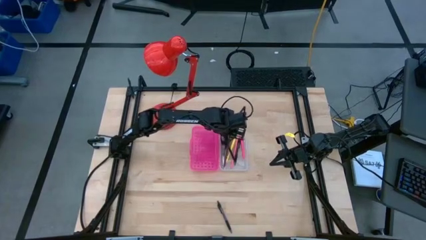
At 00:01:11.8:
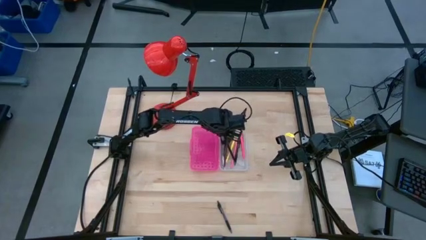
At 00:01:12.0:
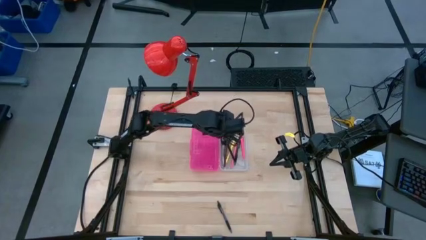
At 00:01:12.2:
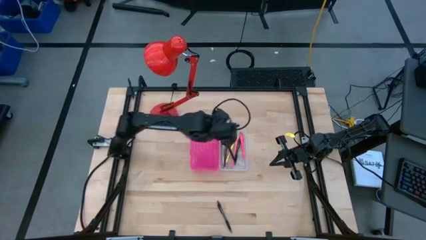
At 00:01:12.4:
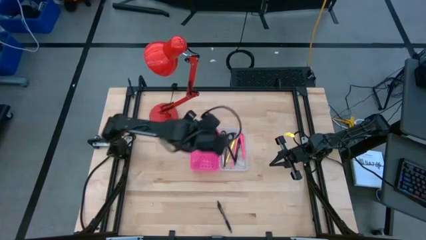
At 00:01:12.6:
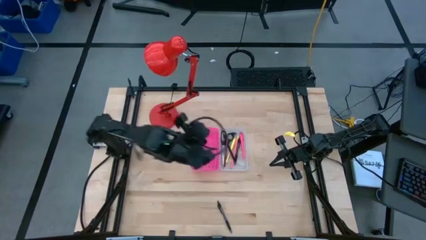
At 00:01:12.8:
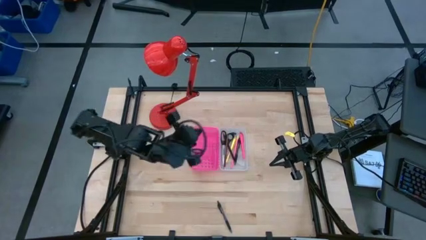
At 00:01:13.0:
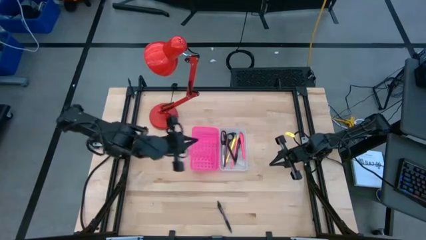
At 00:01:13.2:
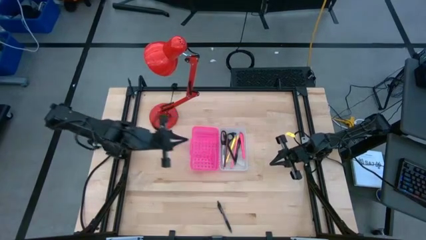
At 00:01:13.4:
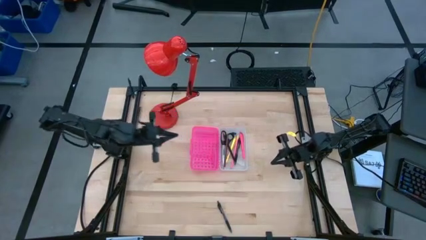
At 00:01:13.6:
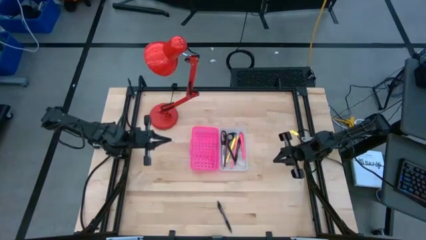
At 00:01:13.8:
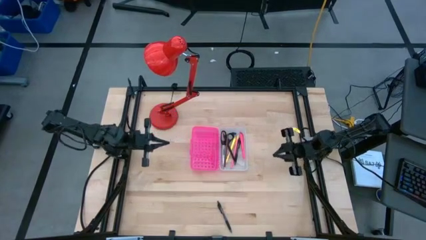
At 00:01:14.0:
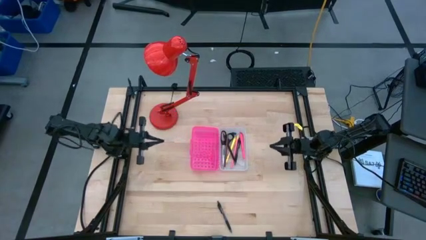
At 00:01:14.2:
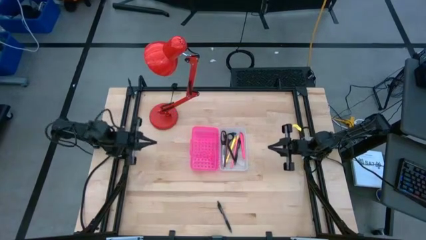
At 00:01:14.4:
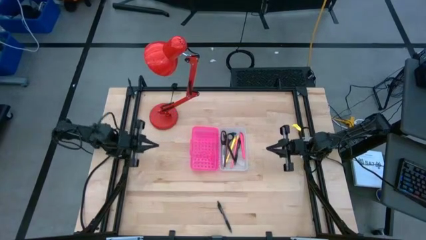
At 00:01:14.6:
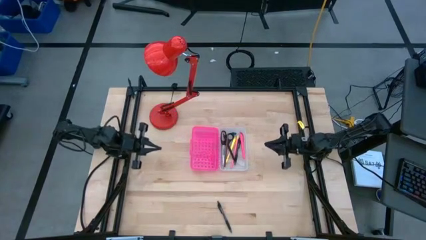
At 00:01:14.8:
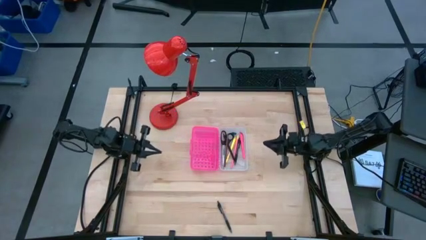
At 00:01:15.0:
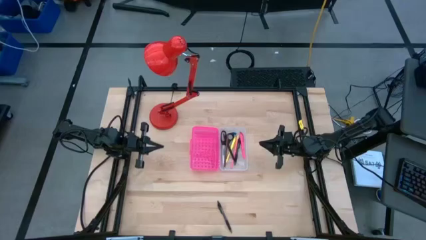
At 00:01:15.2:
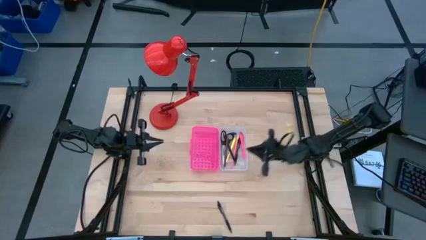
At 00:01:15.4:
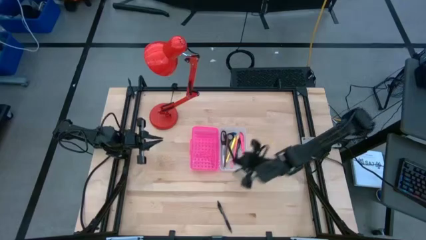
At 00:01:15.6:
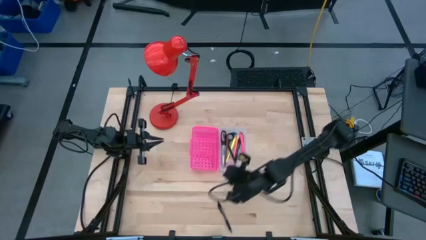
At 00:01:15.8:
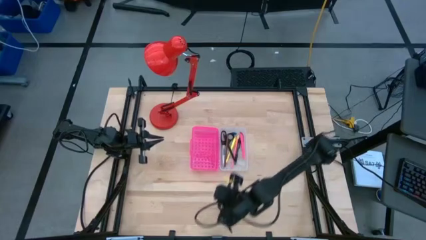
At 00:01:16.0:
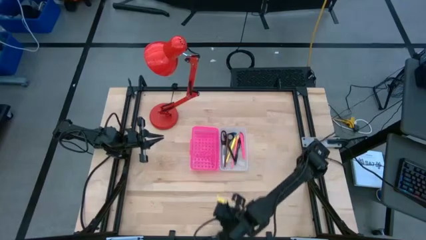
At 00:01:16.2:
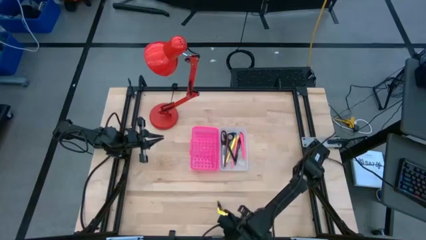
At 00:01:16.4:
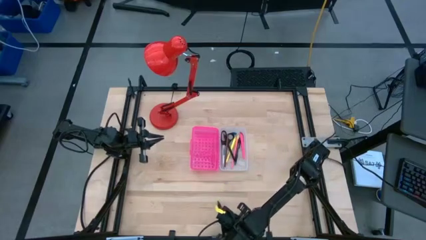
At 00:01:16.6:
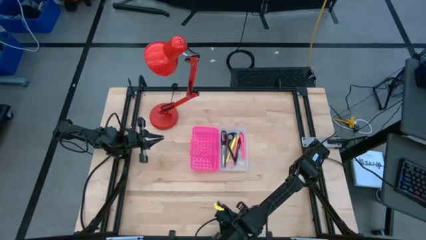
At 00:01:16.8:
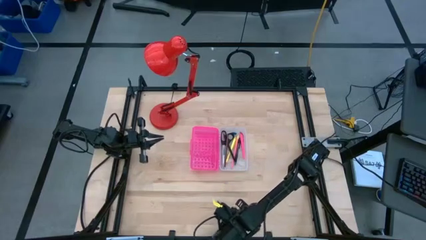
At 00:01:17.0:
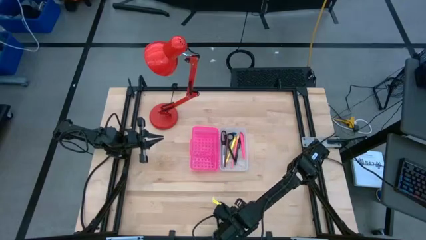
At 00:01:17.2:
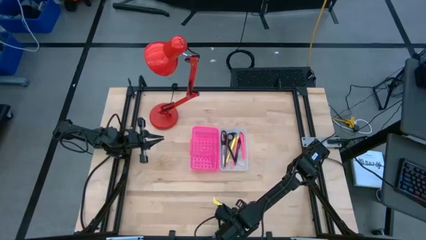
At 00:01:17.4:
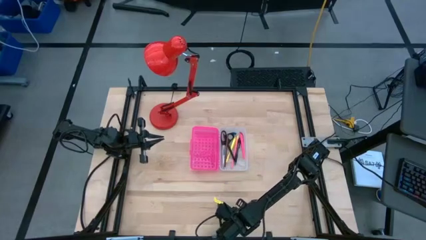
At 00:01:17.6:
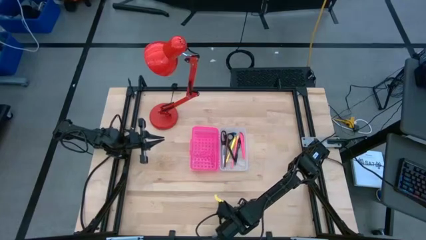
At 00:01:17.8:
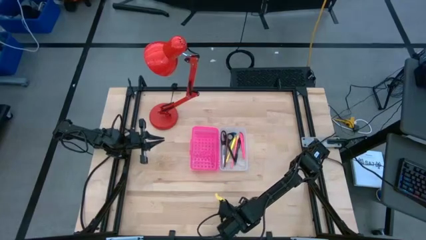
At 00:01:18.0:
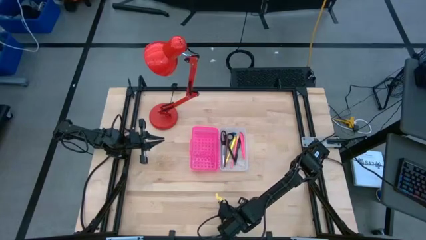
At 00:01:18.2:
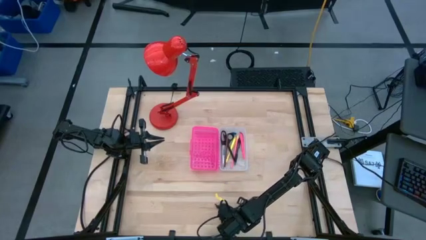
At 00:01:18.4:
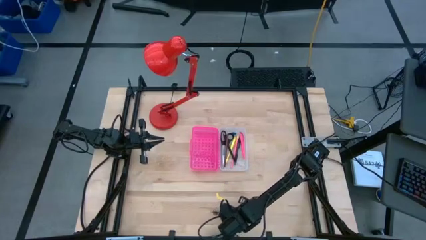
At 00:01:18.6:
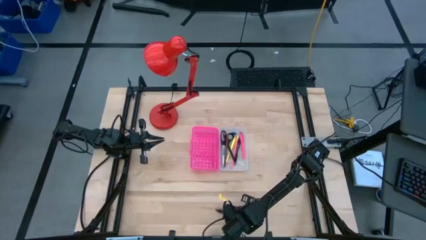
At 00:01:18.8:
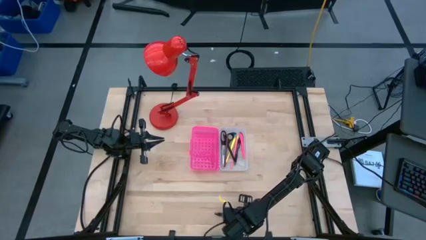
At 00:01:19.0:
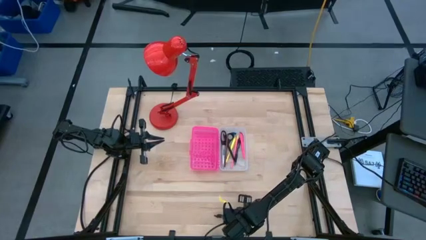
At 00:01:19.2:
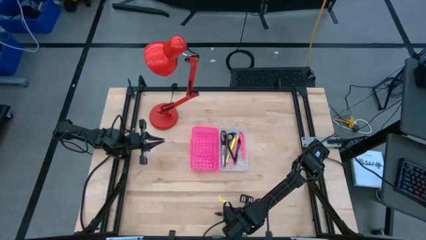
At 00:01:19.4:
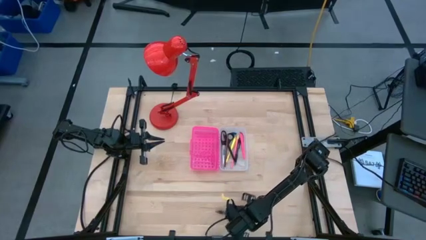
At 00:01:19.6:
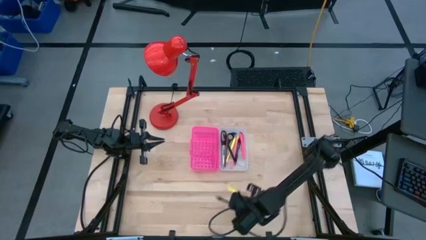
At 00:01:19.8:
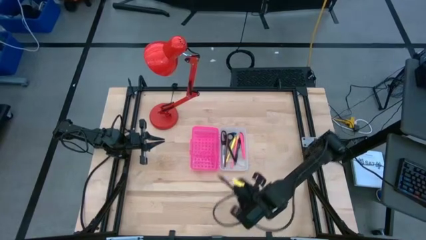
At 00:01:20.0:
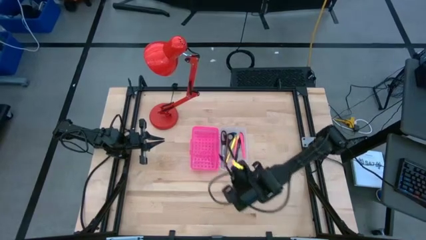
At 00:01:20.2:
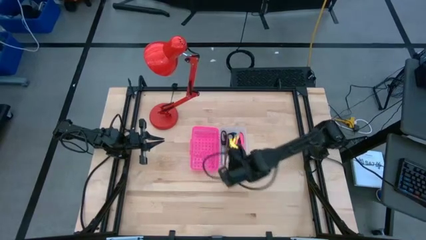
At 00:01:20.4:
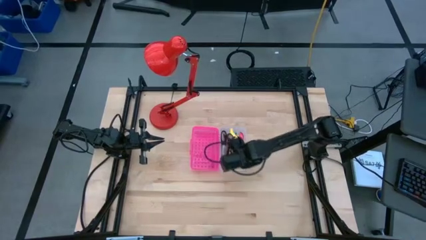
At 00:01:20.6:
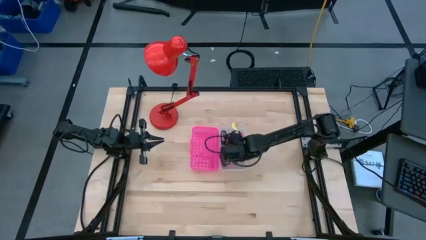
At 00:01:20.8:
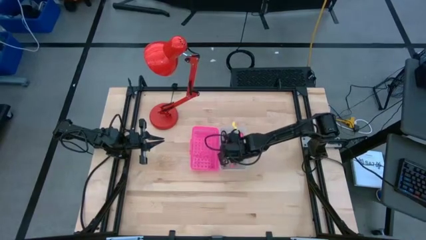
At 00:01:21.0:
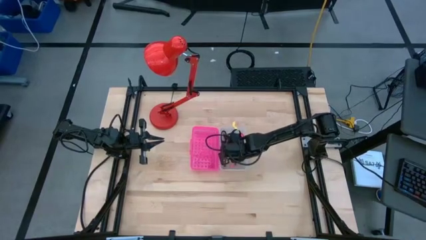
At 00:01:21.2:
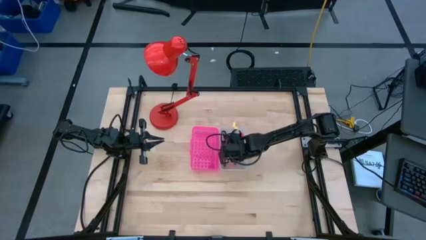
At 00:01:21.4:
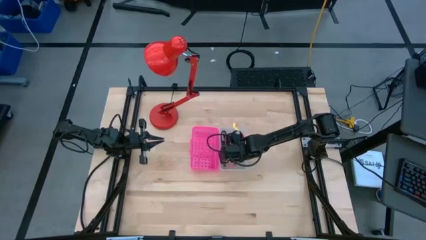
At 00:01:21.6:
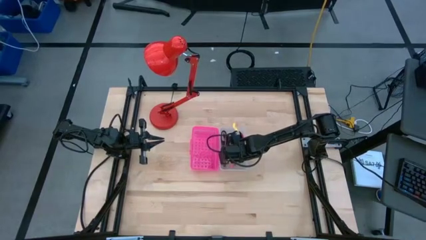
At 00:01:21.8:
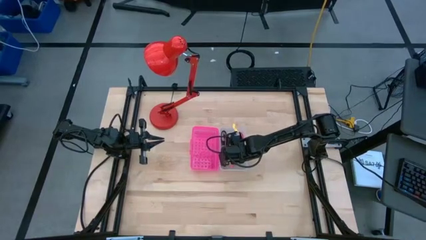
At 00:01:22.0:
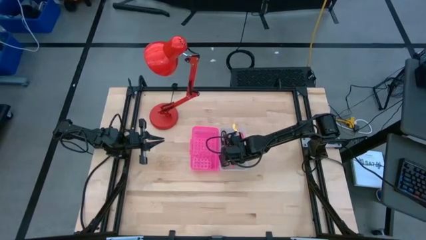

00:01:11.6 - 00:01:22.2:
Task: Pick & place school supplies into a supply box
Put the black pen into the supply box

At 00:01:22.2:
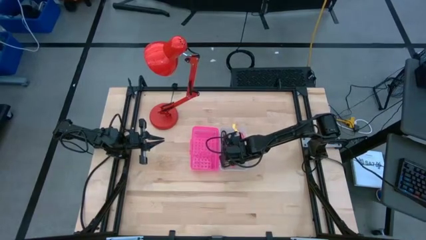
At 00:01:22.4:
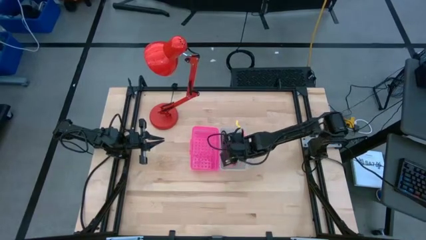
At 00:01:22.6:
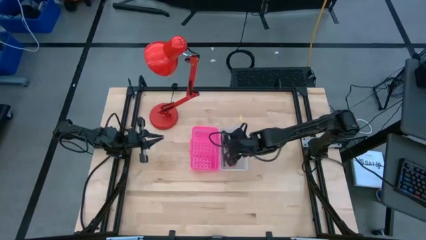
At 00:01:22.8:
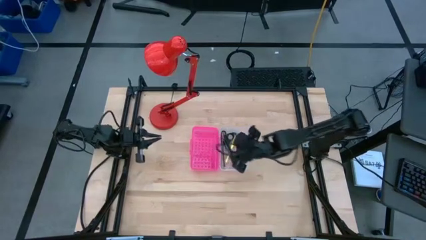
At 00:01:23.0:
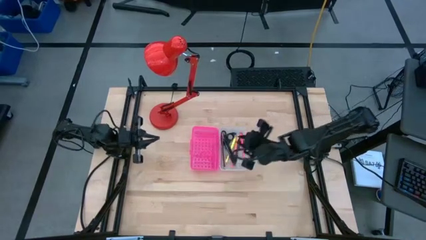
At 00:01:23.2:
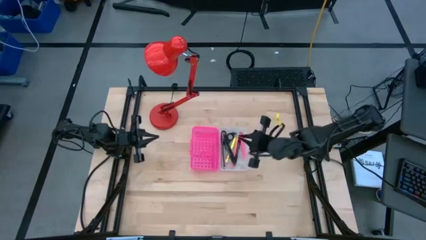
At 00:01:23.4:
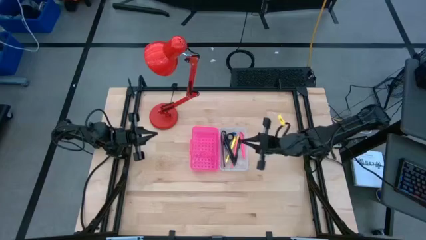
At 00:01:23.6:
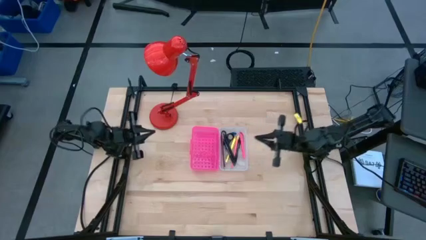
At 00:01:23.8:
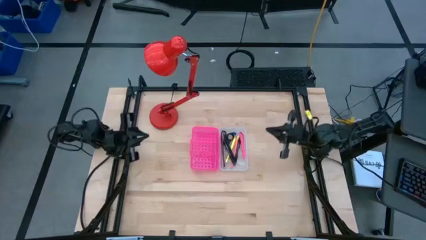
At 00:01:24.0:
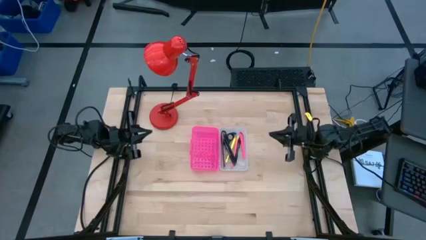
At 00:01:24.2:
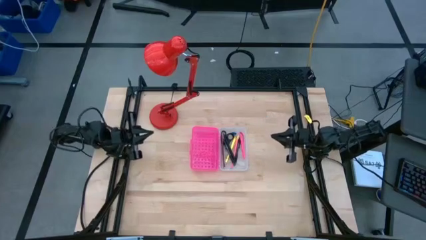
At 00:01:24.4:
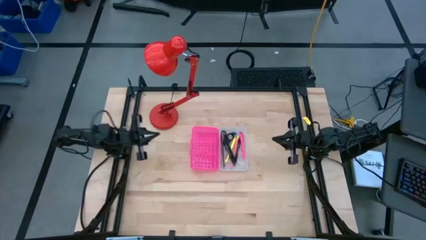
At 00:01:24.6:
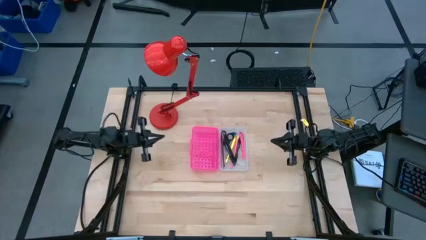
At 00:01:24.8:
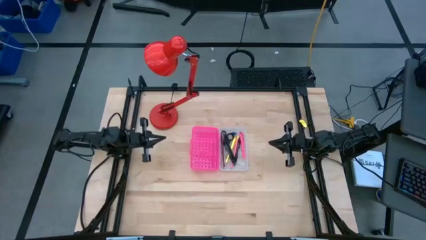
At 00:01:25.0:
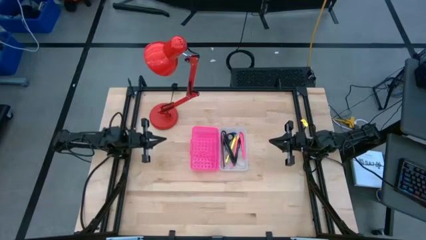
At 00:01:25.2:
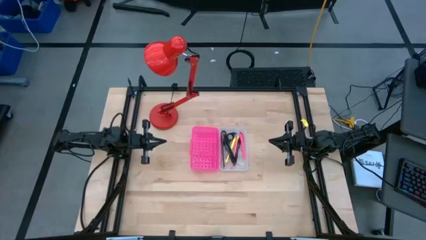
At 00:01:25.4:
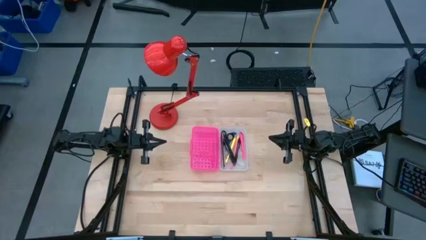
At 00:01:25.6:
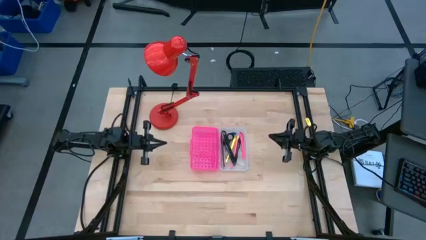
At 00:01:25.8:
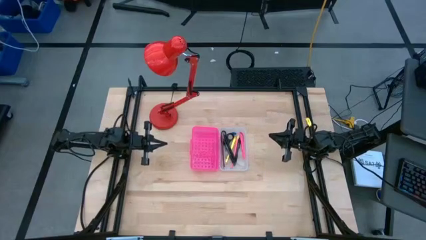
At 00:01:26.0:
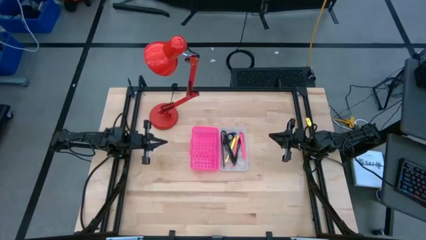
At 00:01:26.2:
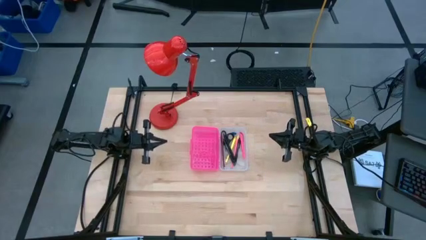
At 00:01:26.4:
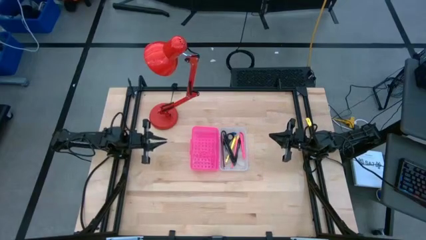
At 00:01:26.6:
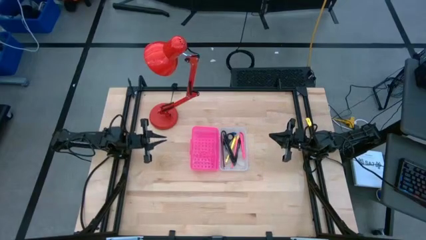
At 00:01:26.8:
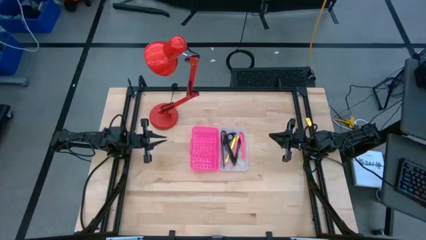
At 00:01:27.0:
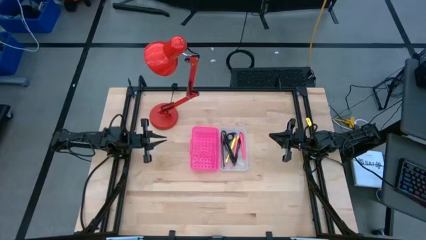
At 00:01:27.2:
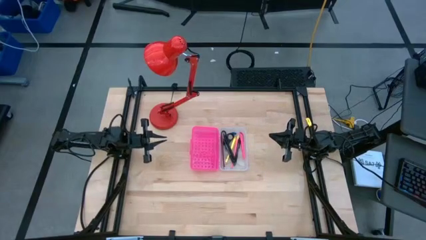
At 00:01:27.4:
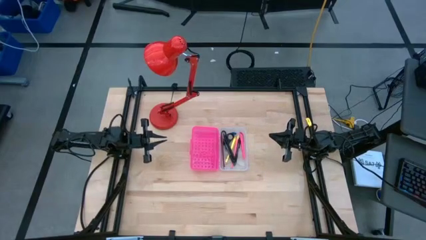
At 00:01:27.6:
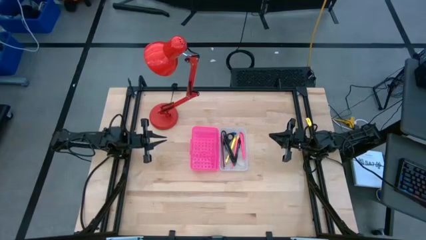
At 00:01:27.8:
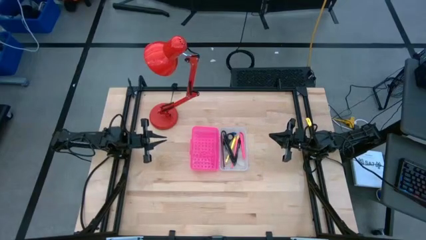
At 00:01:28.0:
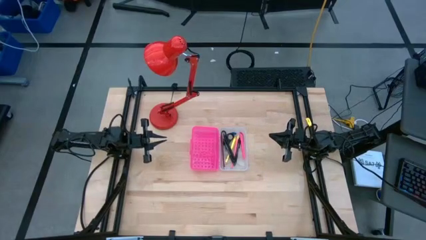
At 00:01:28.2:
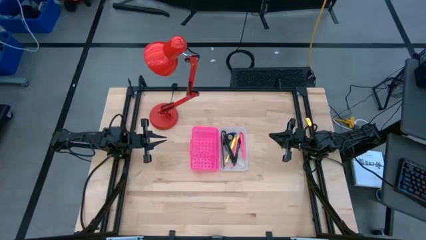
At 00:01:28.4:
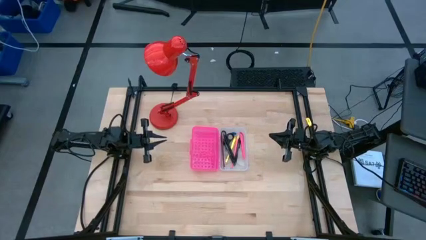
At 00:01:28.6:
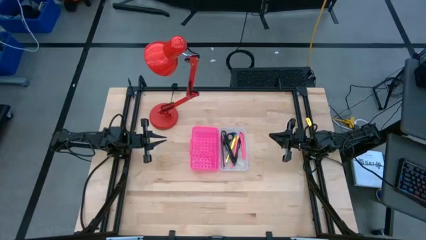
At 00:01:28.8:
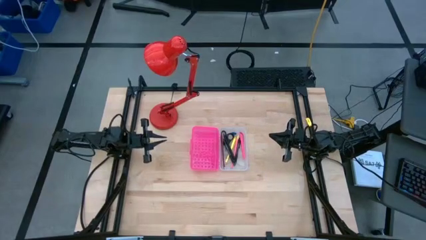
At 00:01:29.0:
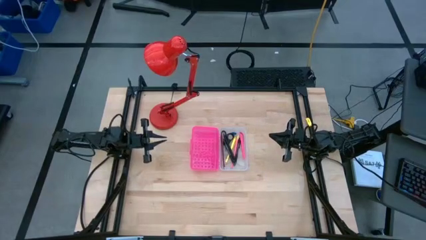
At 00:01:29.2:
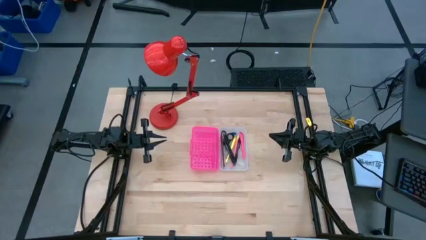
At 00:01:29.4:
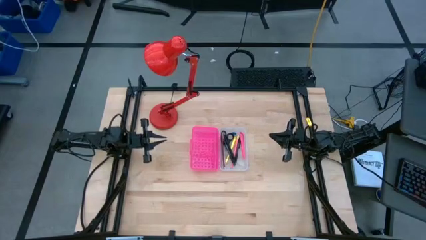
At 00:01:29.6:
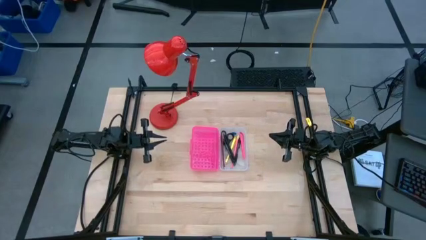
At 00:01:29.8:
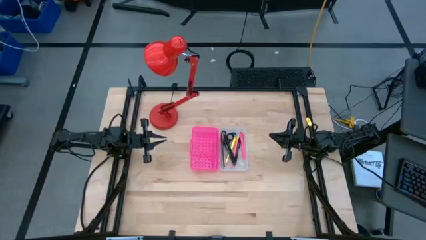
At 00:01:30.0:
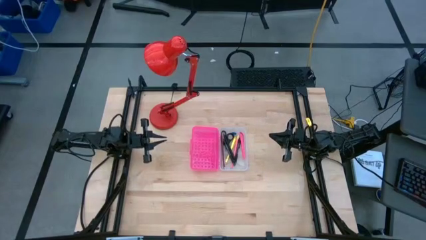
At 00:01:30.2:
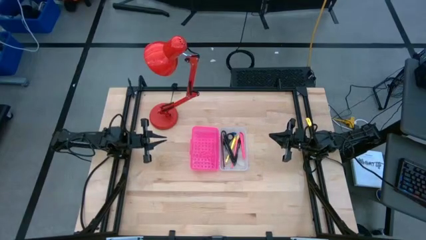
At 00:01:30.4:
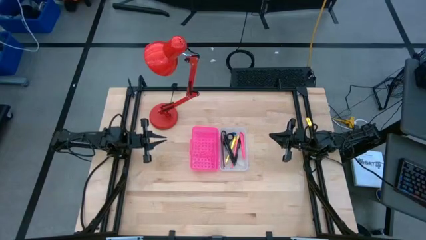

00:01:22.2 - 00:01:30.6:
Return to Home Position
